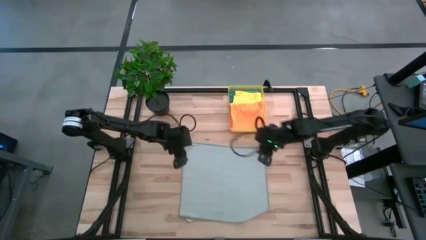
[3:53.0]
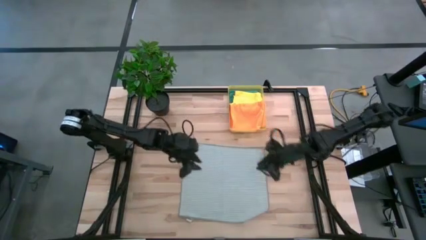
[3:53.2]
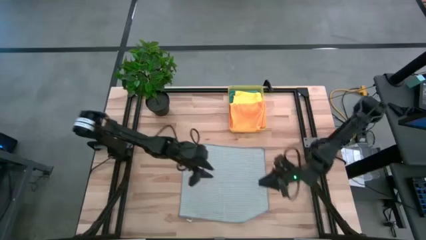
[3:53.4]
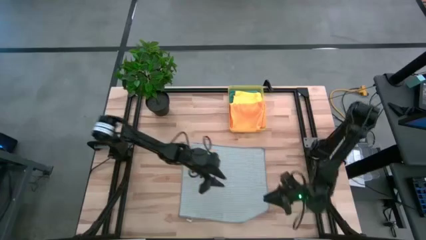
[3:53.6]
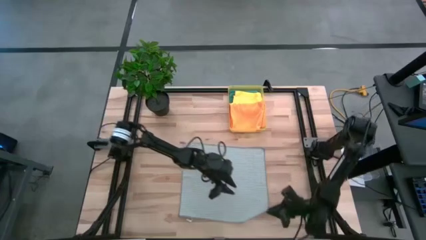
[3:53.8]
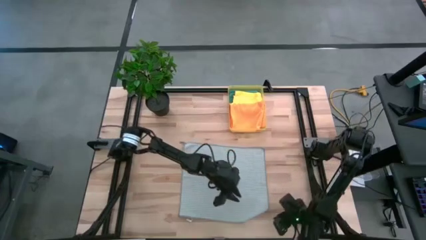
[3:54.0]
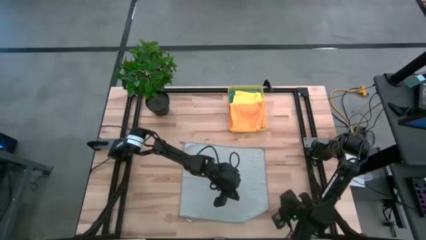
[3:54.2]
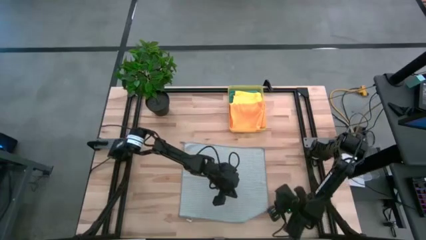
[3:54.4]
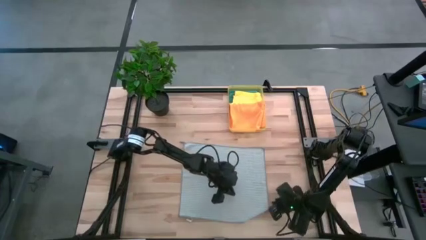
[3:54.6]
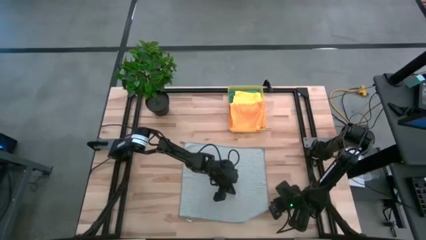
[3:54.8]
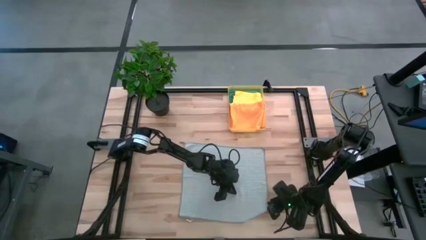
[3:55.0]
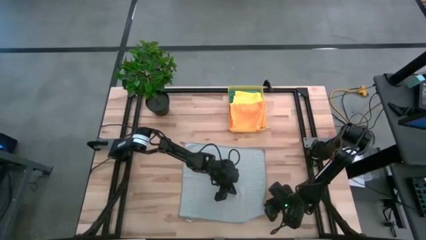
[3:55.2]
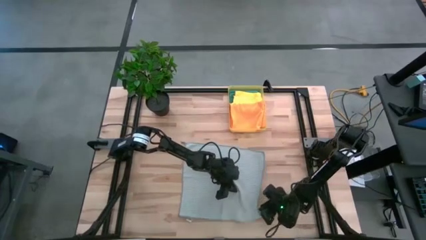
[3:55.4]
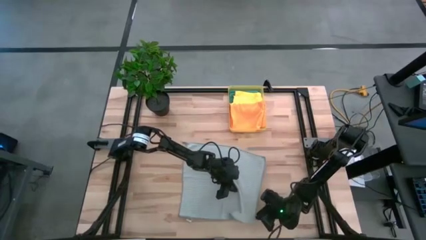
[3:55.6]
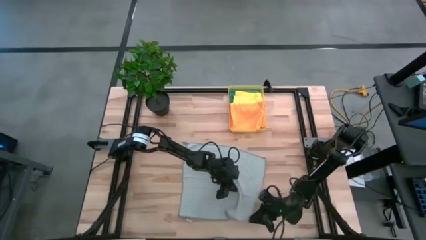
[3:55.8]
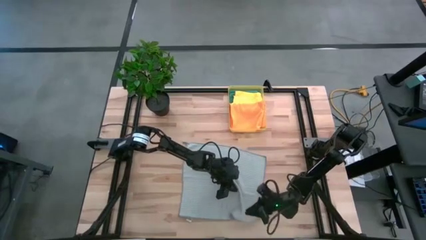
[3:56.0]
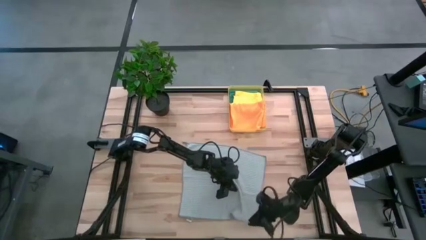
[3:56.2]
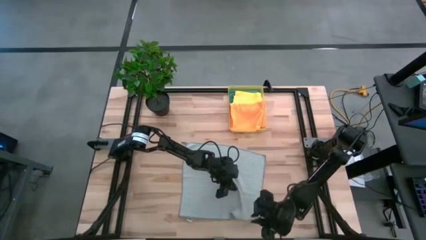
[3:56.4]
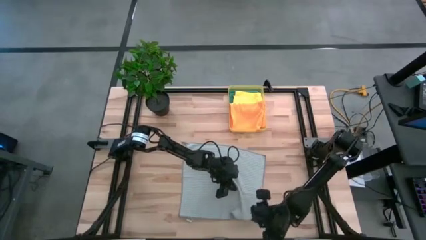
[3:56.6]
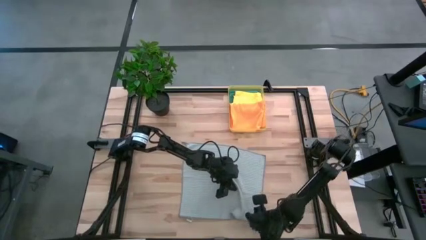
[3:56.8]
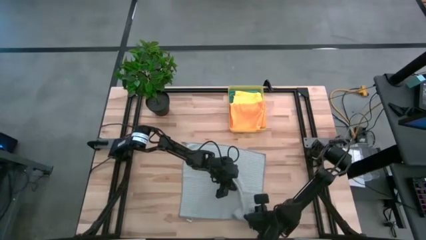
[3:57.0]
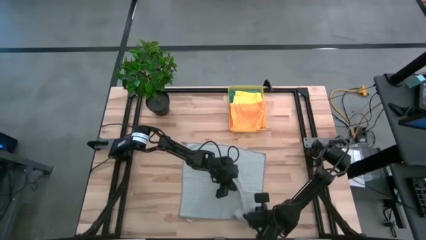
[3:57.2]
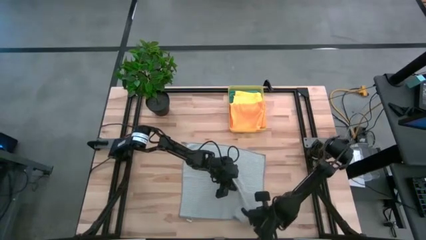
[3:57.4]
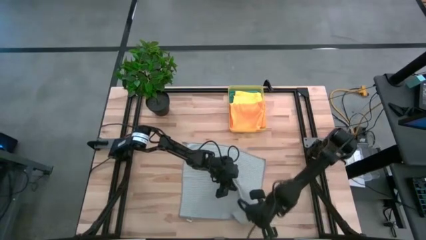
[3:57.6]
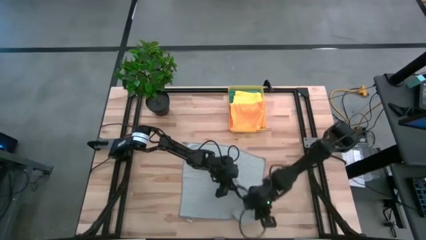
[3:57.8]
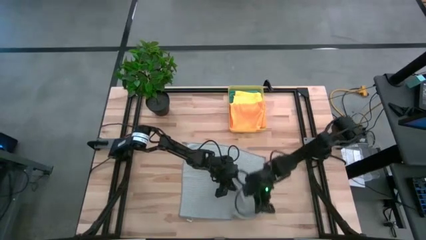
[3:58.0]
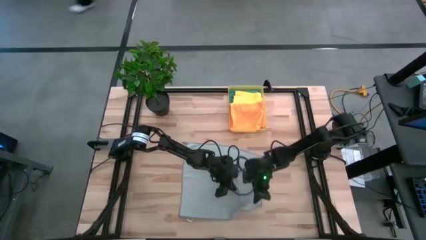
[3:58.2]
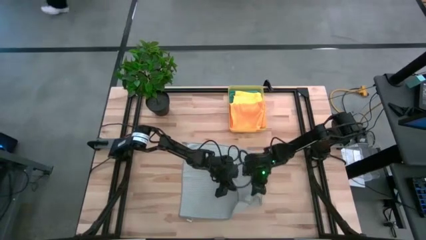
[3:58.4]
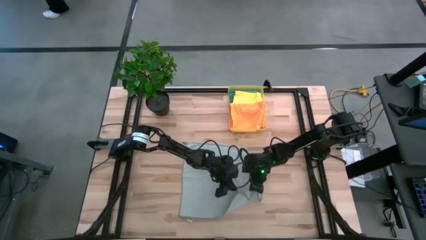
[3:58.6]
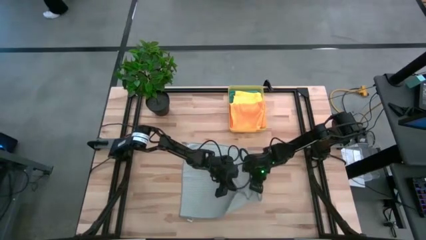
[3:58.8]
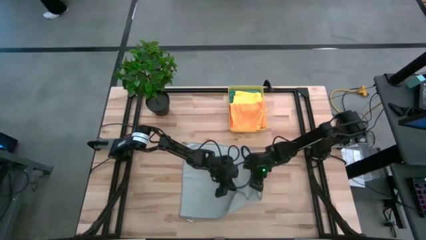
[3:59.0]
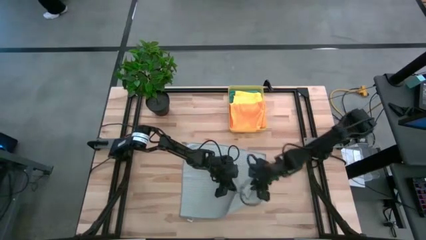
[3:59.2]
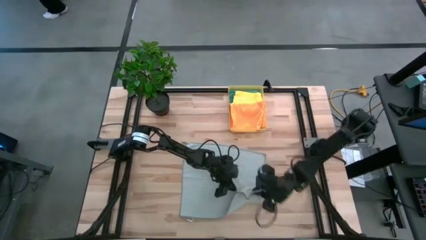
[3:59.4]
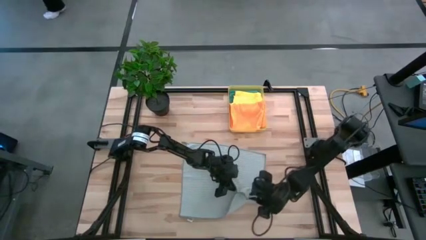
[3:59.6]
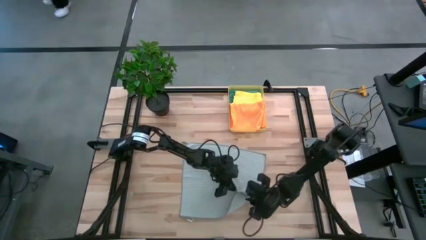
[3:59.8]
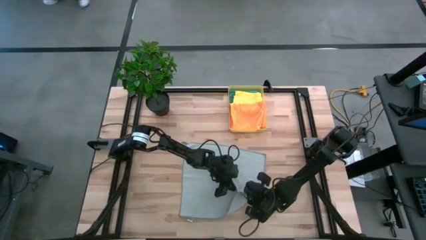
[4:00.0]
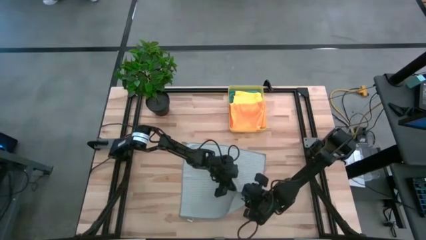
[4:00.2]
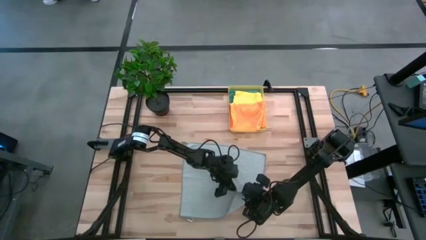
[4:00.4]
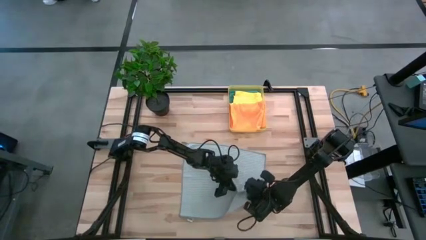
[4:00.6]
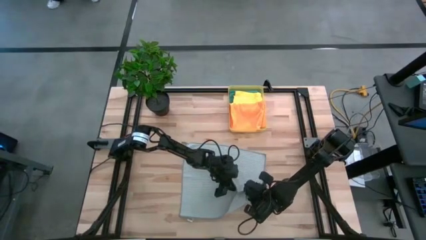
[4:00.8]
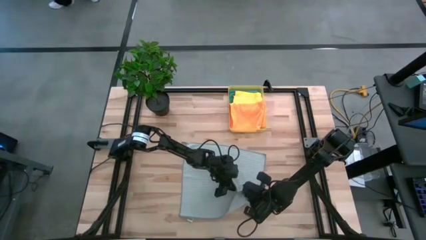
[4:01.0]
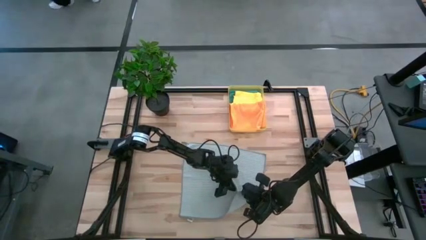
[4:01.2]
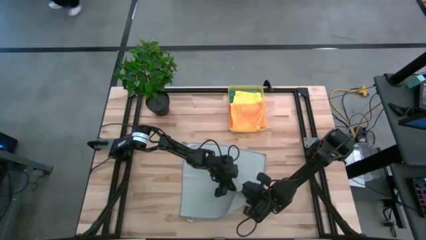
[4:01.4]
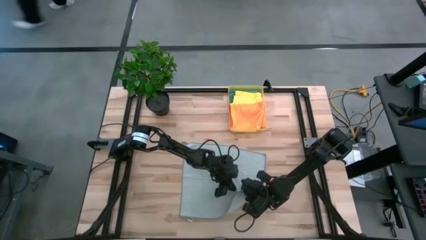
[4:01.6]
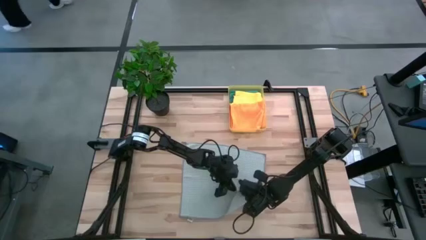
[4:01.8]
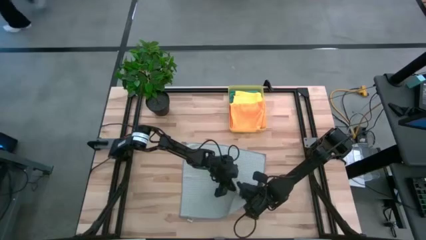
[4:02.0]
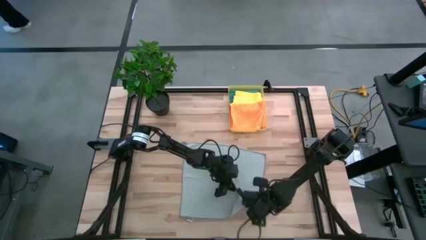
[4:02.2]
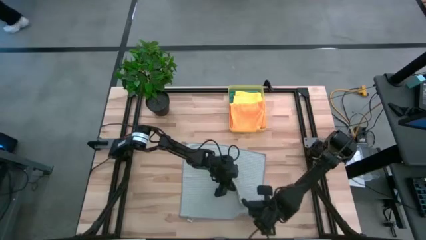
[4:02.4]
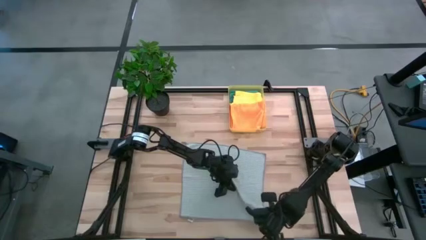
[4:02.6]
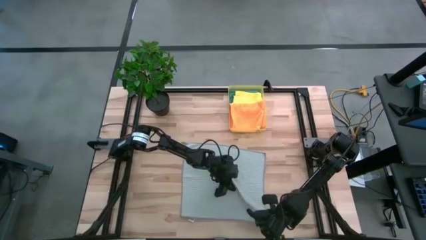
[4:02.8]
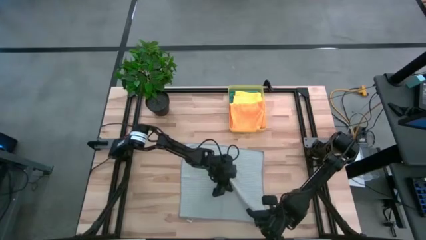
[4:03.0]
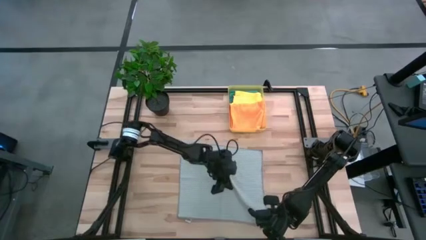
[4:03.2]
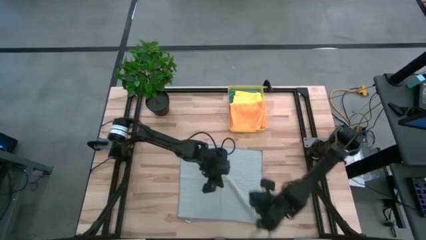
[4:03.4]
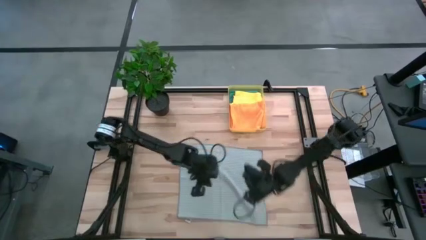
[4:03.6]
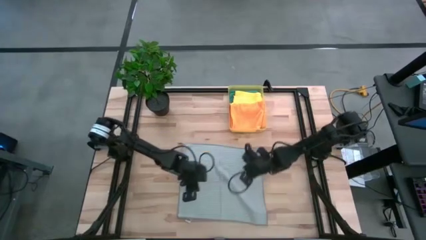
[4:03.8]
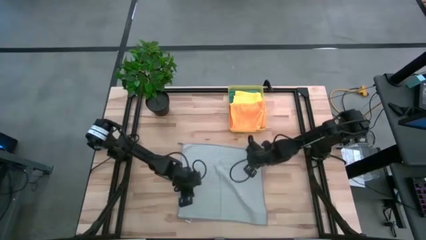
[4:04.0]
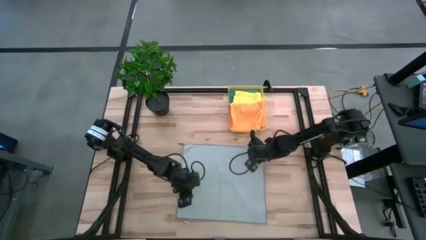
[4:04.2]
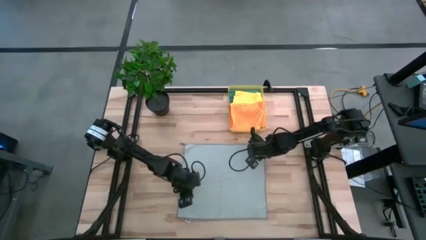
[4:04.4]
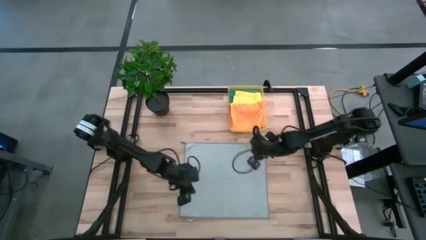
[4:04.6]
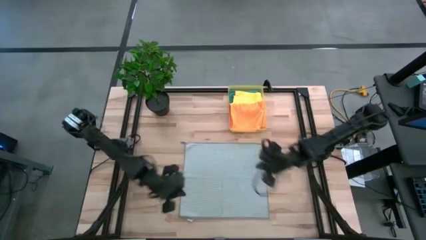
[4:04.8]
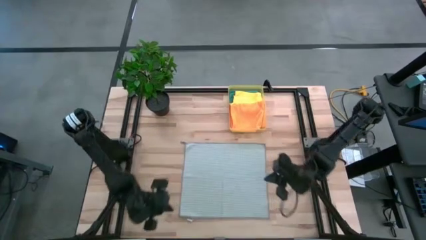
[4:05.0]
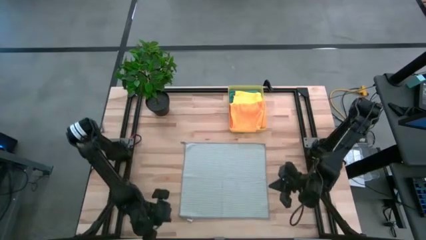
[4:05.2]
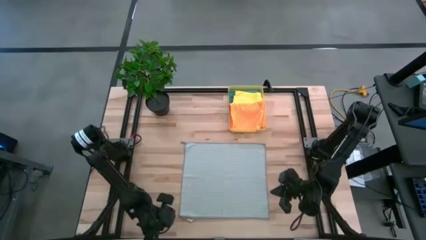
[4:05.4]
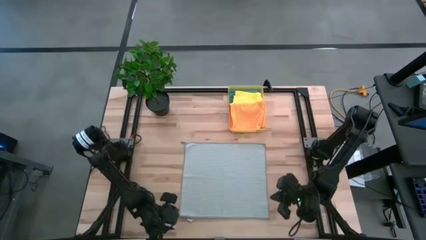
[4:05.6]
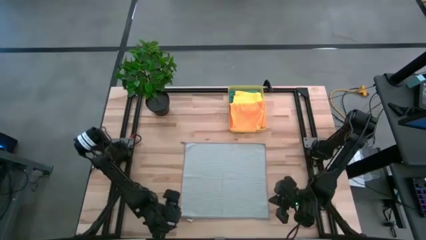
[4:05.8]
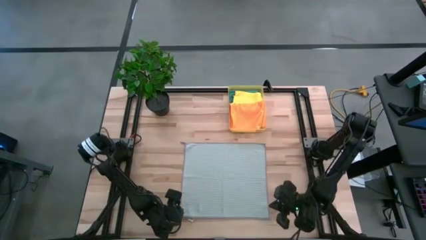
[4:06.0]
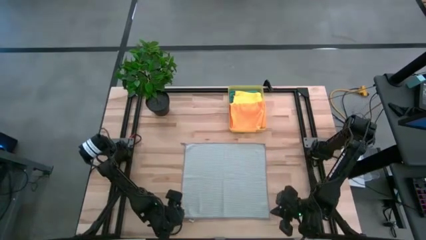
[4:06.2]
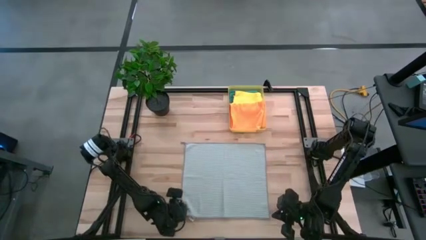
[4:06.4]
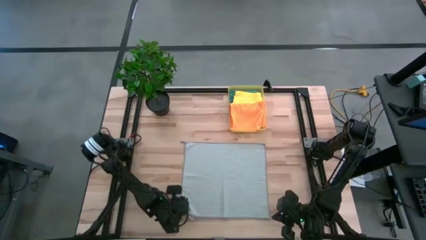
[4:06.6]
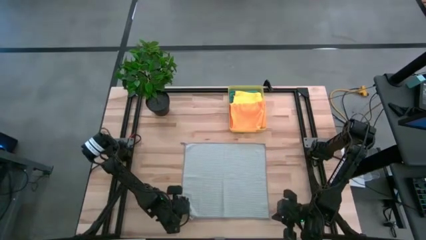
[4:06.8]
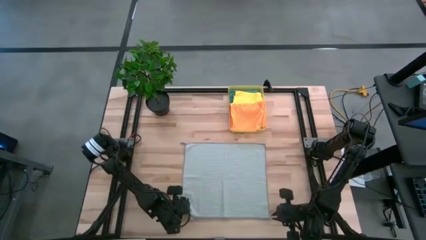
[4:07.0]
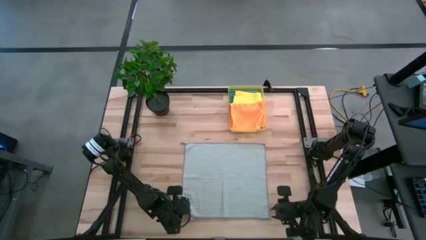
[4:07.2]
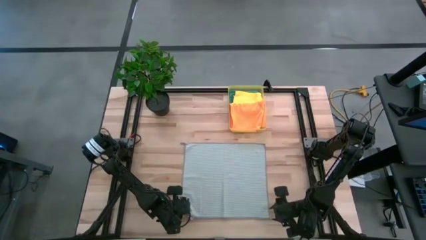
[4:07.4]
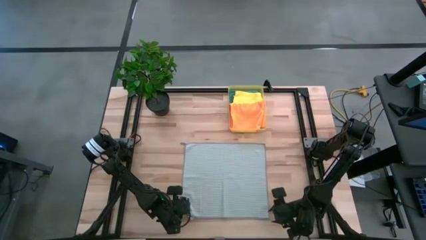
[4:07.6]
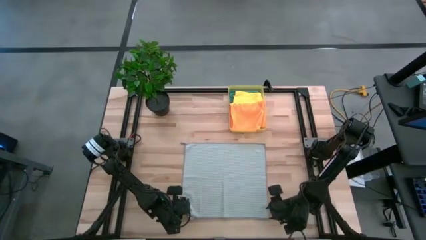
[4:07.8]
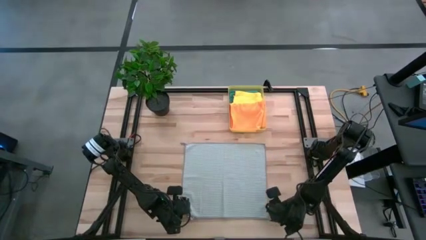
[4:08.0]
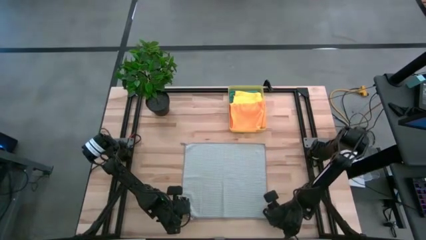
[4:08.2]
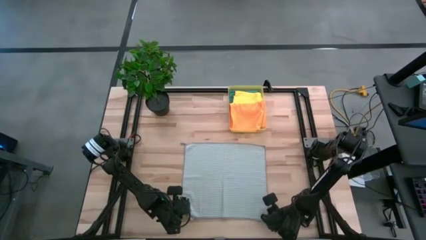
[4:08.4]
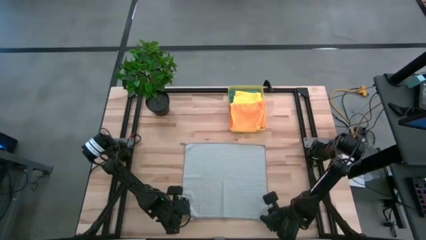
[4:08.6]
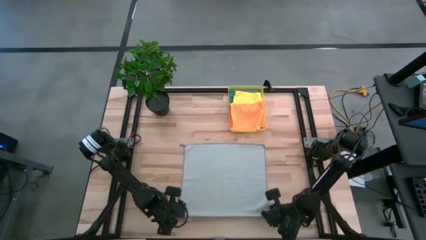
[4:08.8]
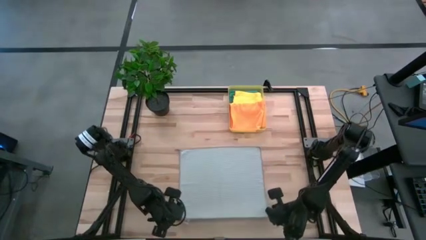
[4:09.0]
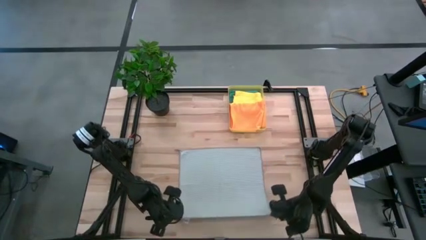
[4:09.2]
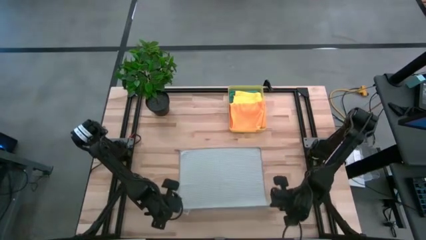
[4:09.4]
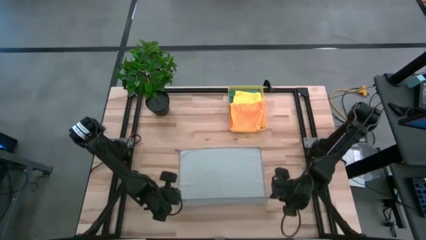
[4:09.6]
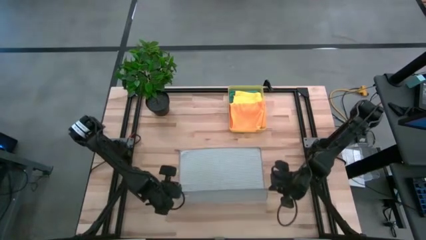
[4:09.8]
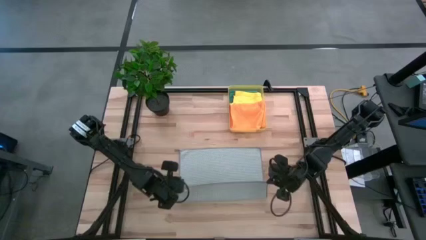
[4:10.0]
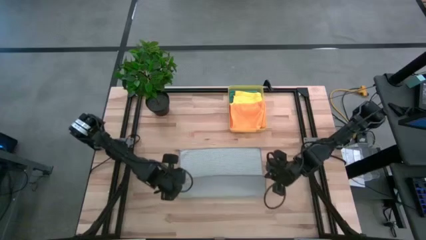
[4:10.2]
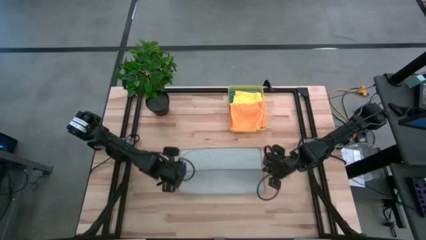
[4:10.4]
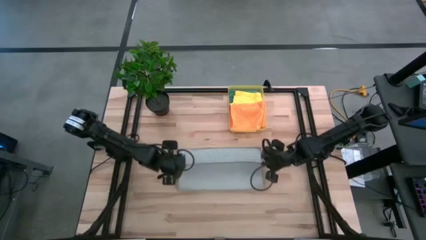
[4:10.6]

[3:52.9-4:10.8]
Task: Fold microfiber towels
Fold the gray microfiber towel
